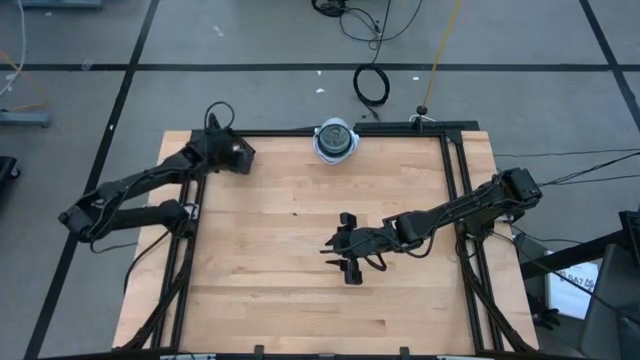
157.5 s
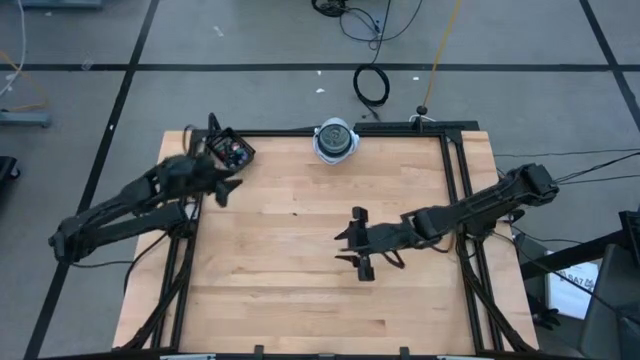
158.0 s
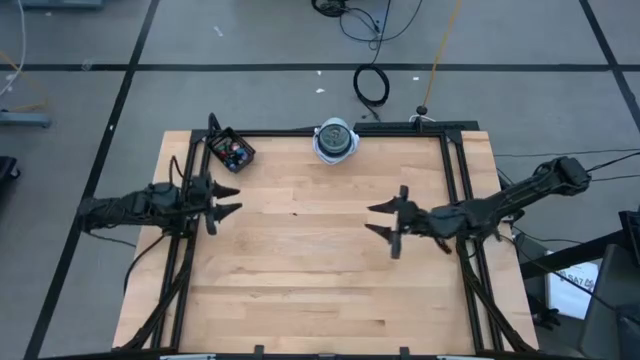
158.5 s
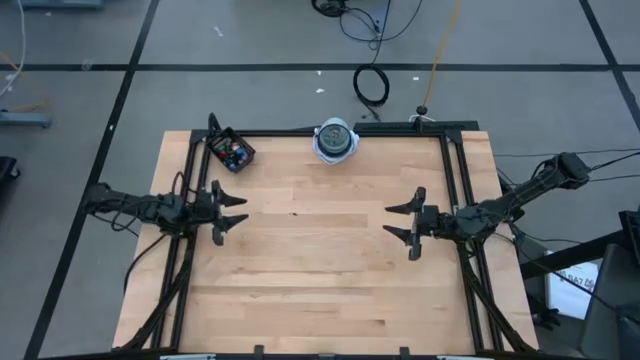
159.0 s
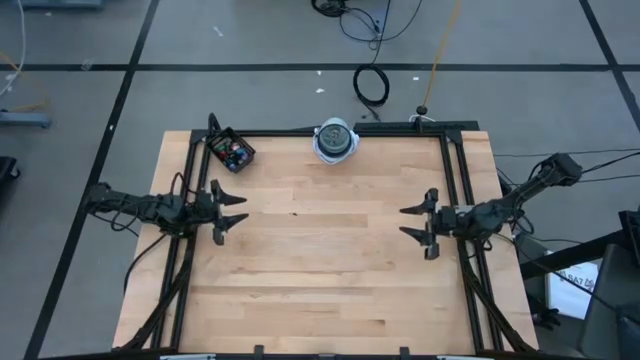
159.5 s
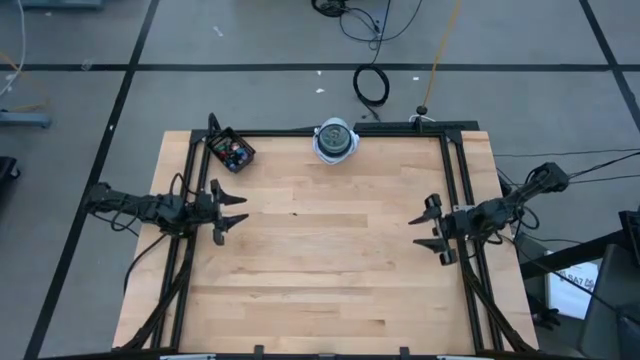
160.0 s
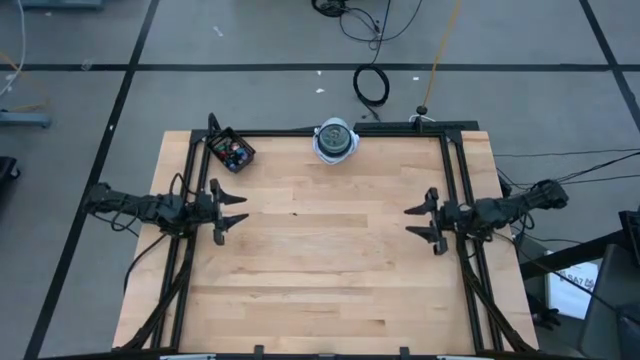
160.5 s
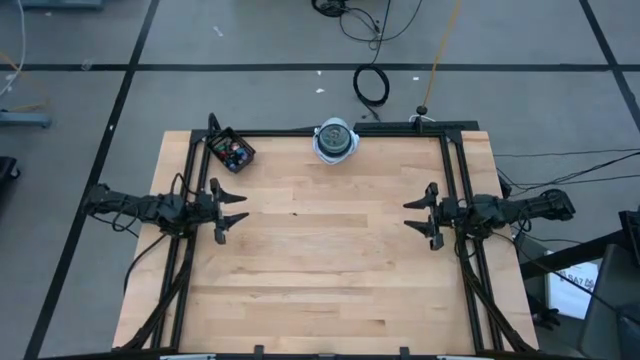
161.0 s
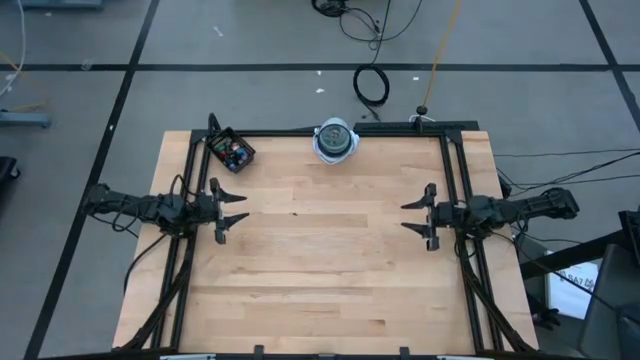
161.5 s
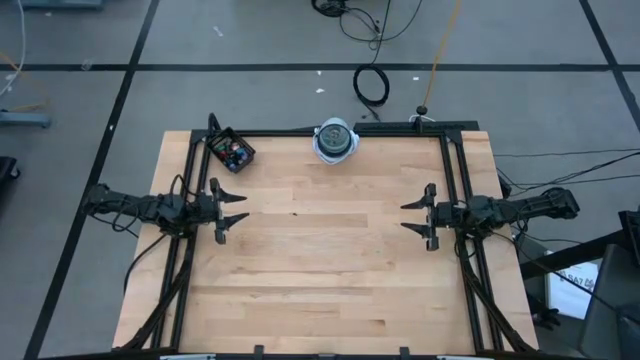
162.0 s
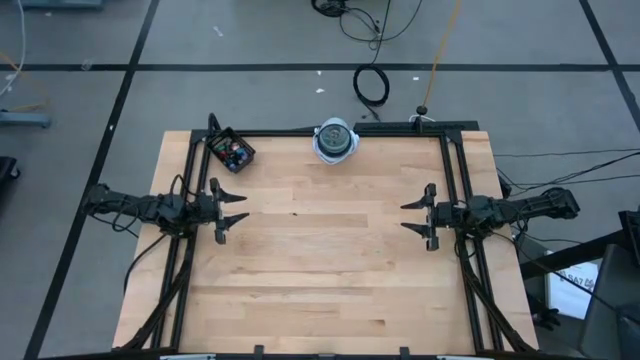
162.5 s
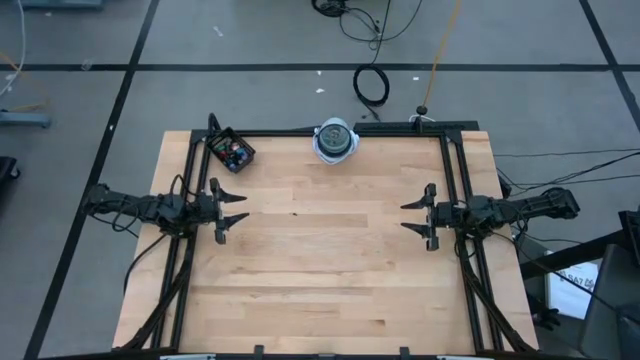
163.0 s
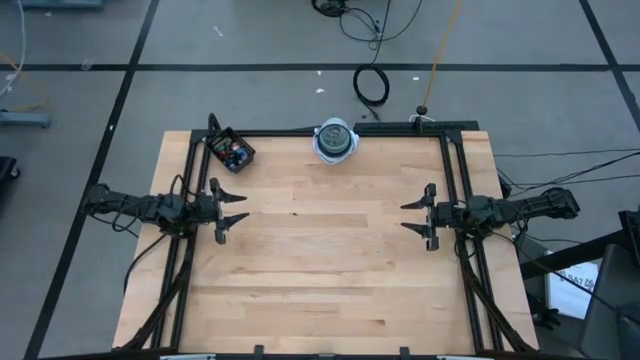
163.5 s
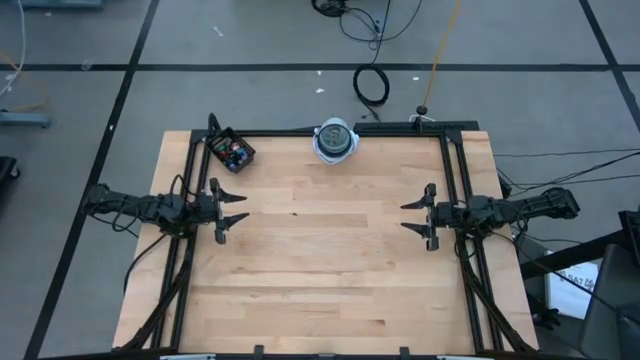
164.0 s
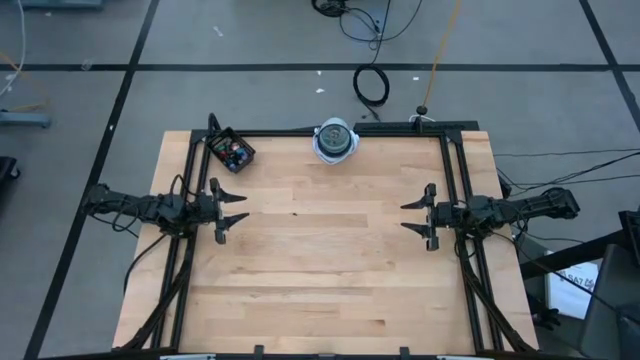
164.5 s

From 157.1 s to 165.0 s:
Task: Pick & Place Nail Polish
Return to Home Position

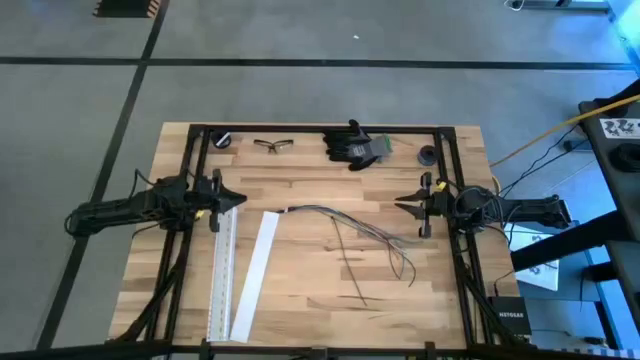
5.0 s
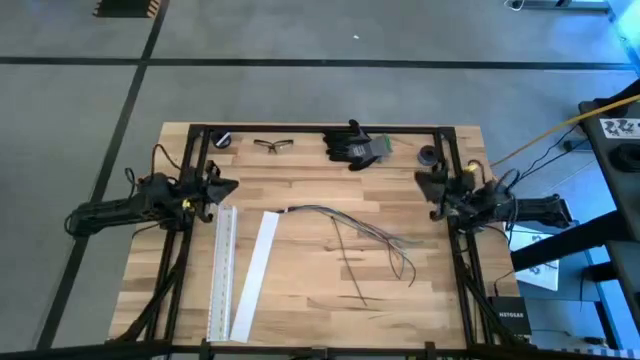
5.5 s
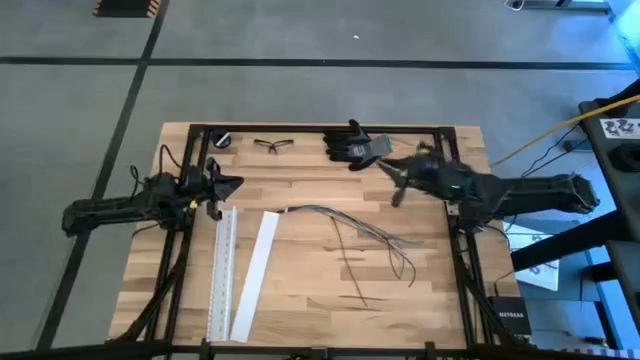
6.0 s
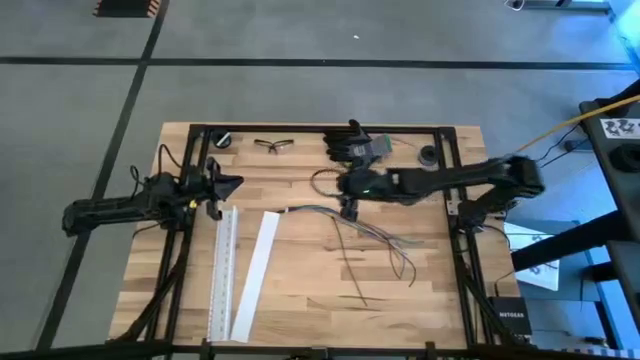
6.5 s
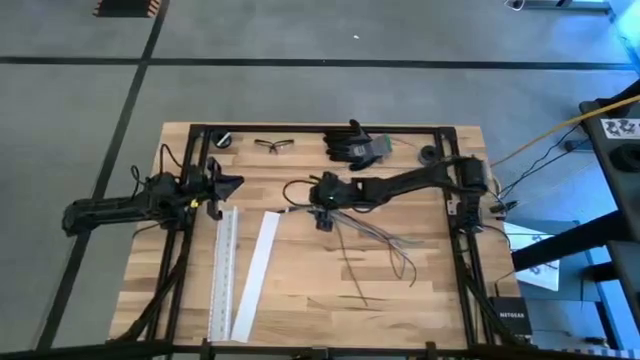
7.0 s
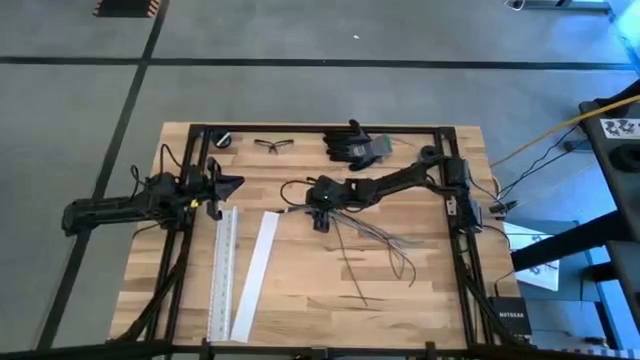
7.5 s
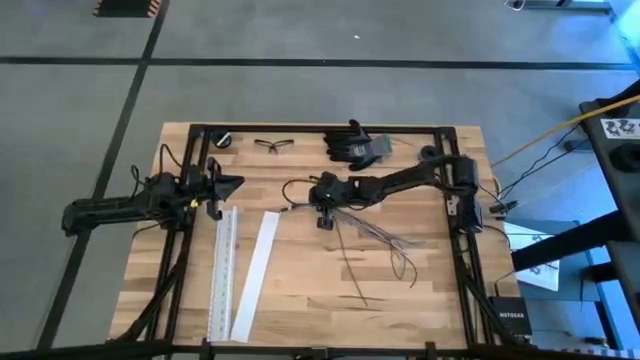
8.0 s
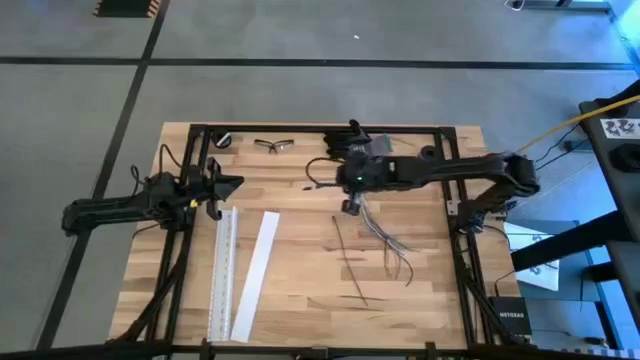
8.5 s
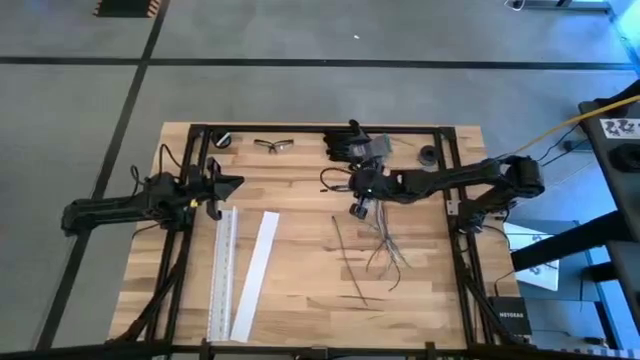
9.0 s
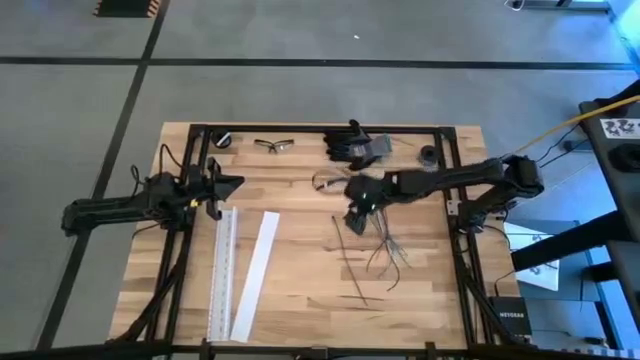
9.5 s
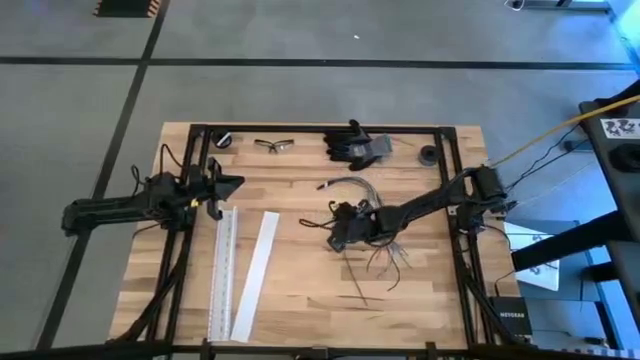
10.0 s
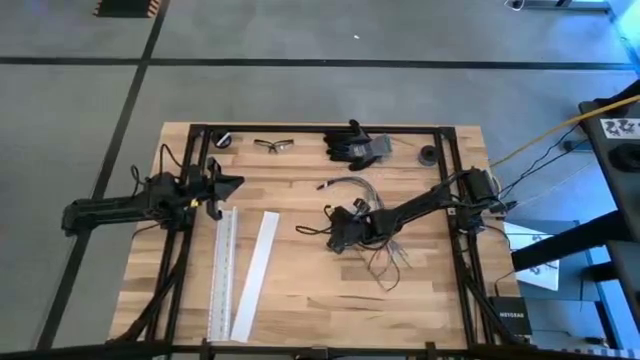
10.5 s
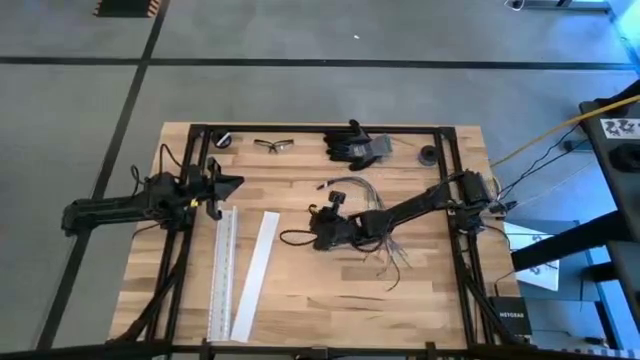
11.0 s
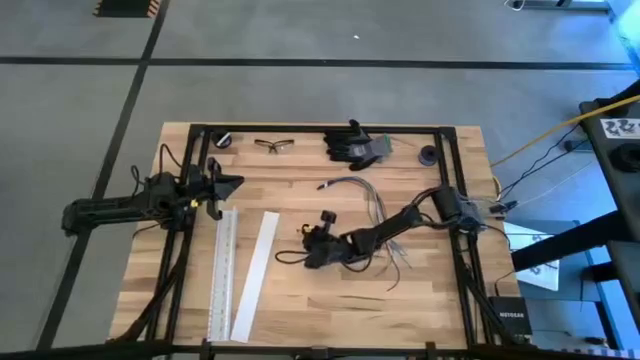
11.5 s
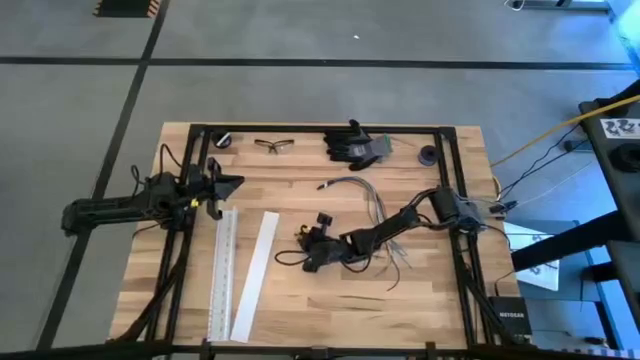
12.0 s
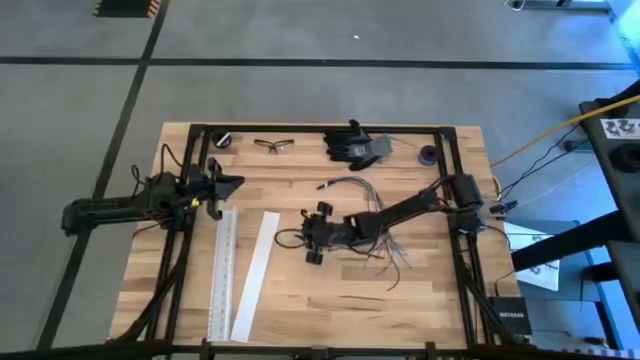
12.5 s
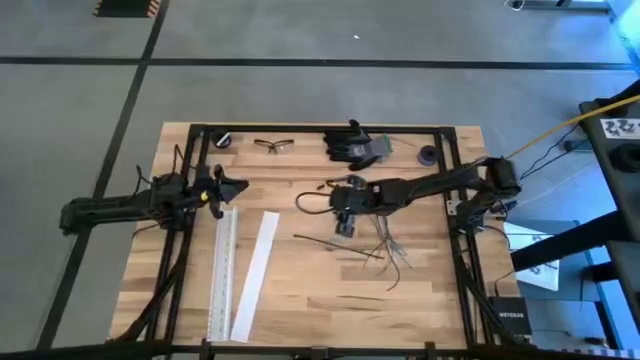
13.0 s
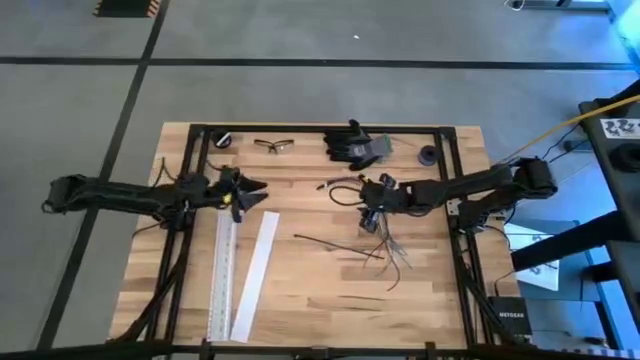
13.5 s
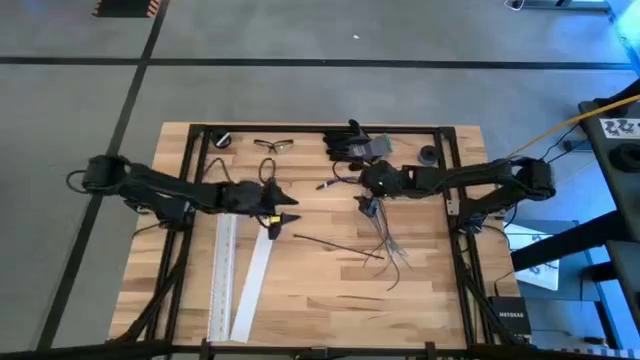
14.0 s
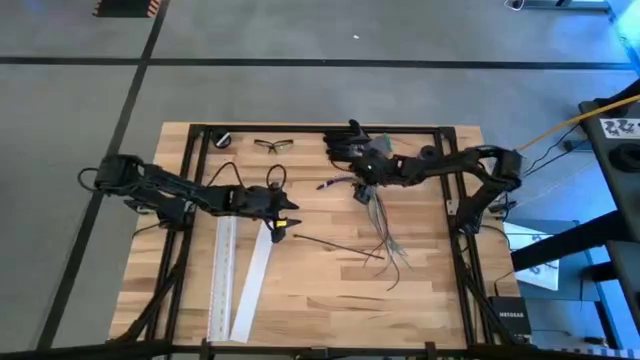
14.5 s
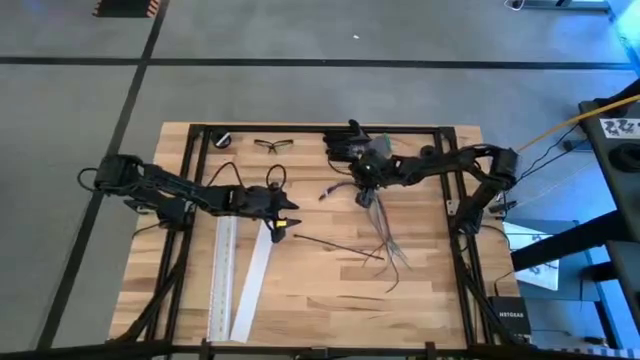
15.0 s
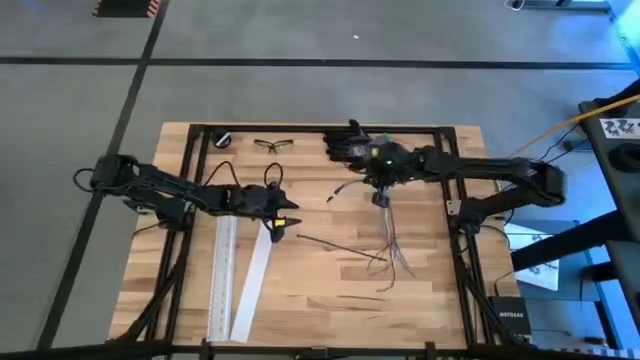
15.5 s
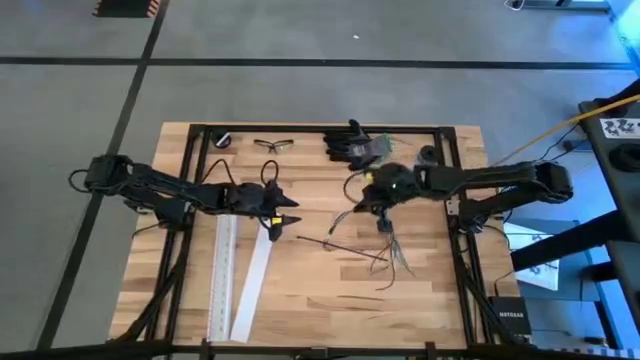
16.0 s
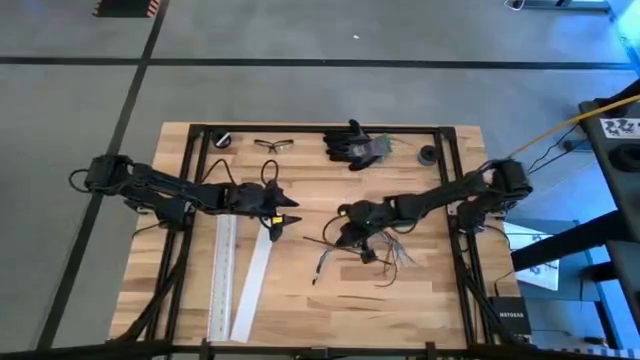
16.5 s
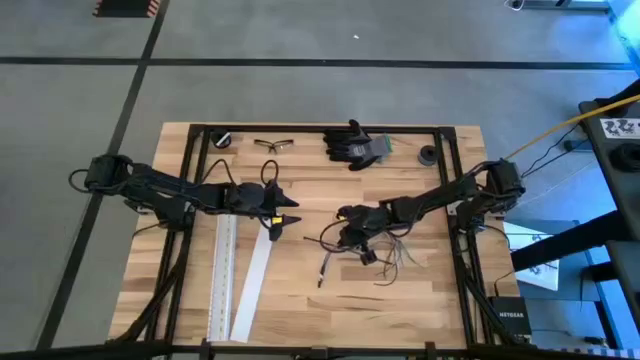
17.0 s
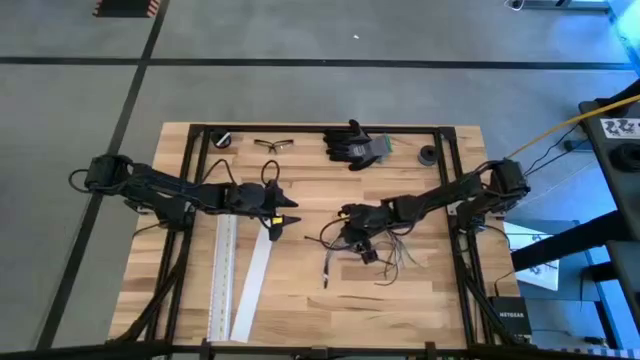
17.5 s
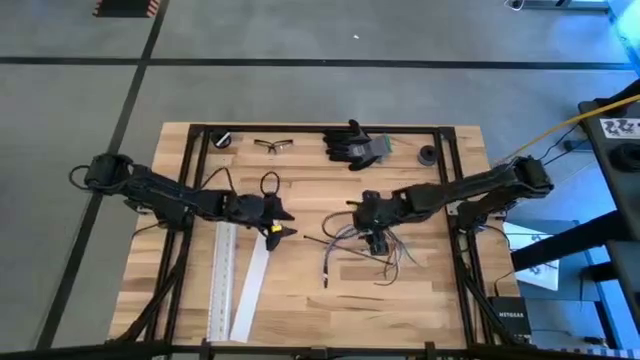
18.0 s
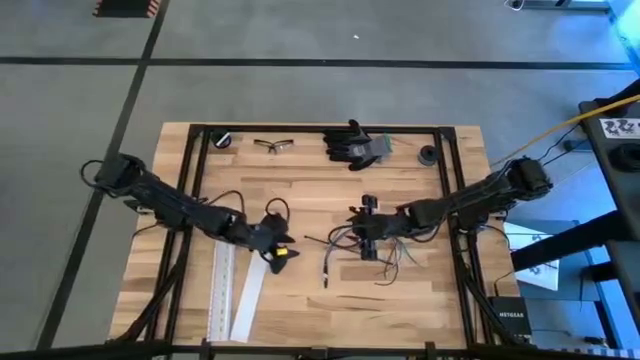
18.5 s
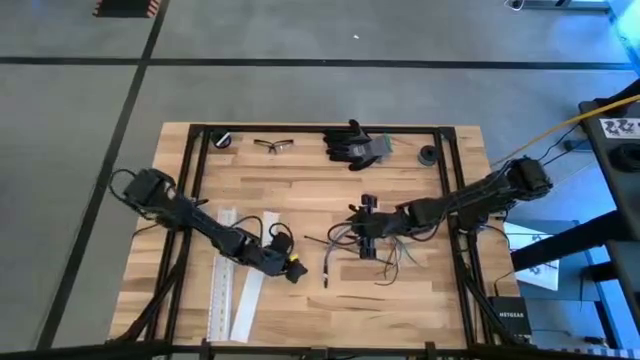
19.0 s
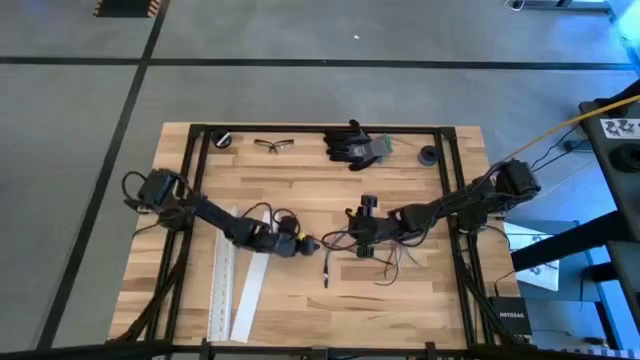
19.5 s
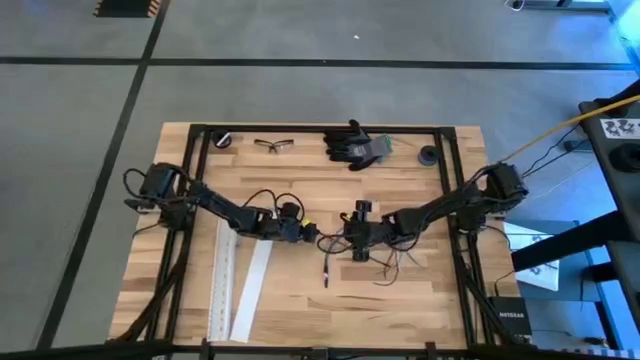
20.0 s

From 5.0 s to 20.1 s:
Task: Ziptie cables
Wrap the black zip tie around the cable wires to form a loop
